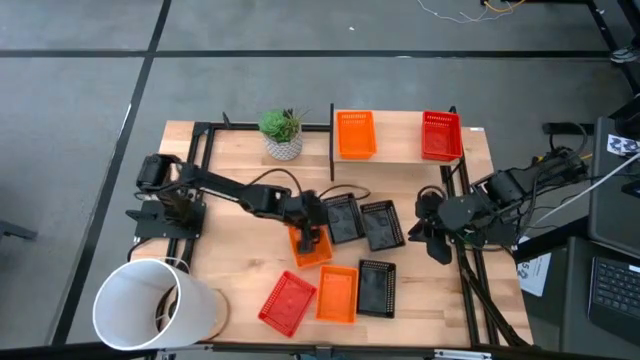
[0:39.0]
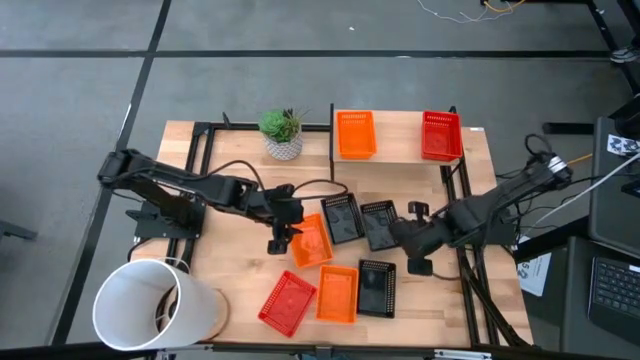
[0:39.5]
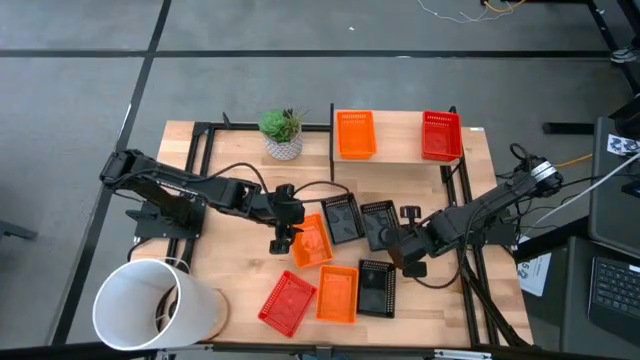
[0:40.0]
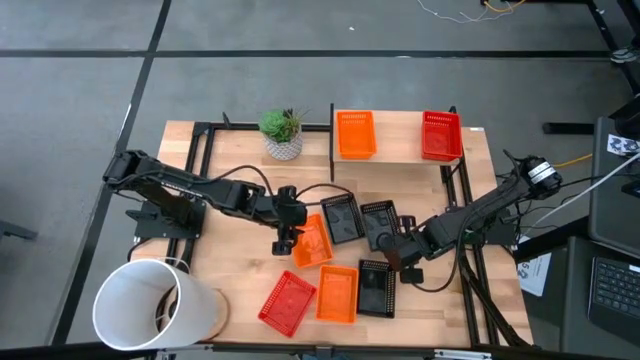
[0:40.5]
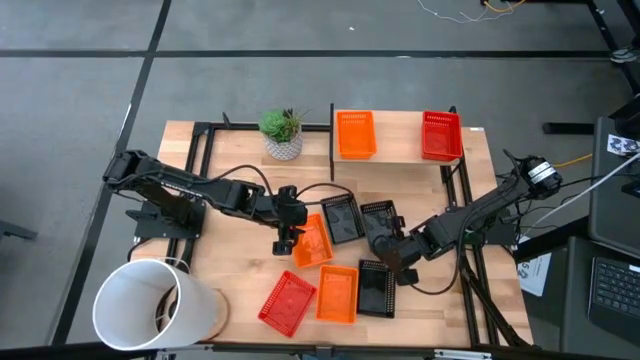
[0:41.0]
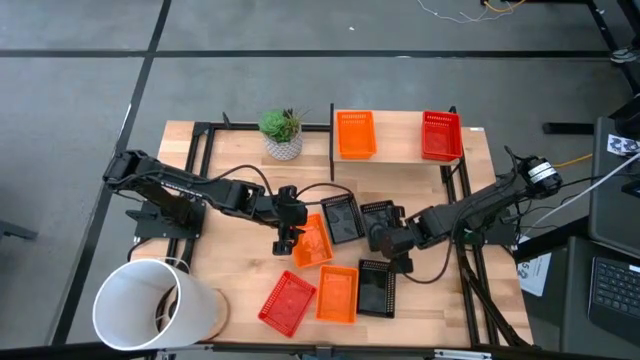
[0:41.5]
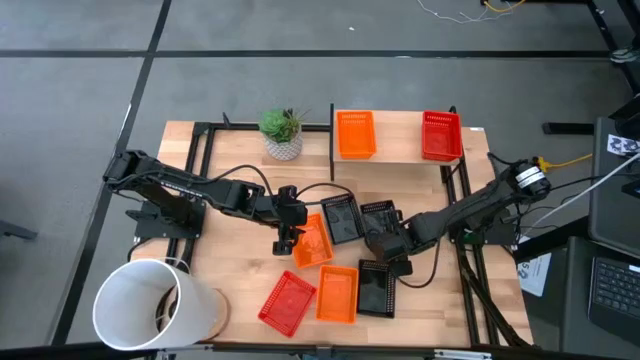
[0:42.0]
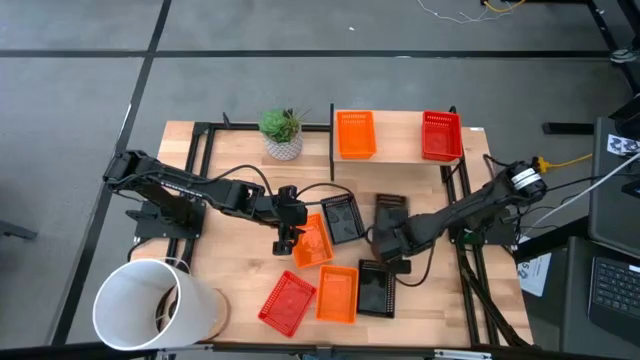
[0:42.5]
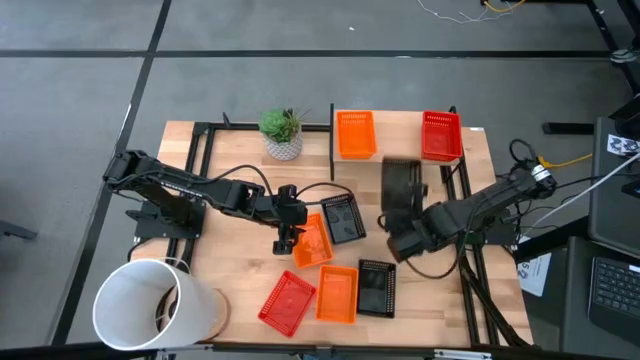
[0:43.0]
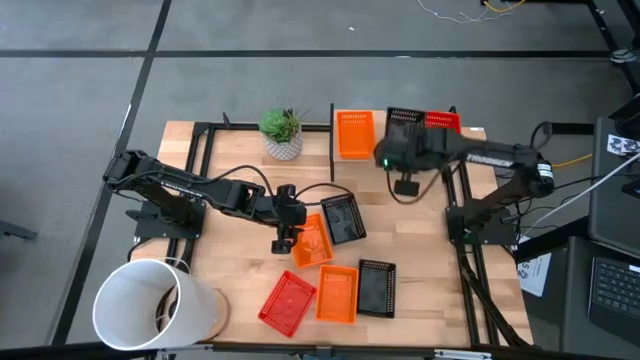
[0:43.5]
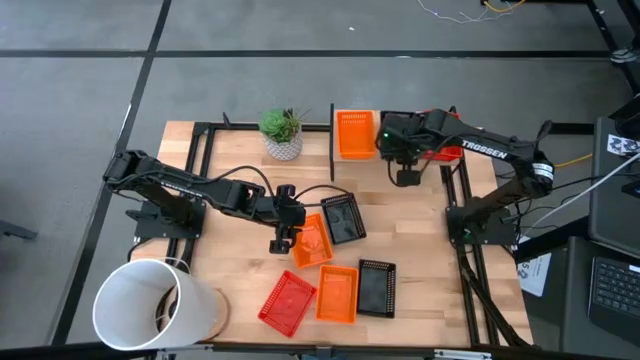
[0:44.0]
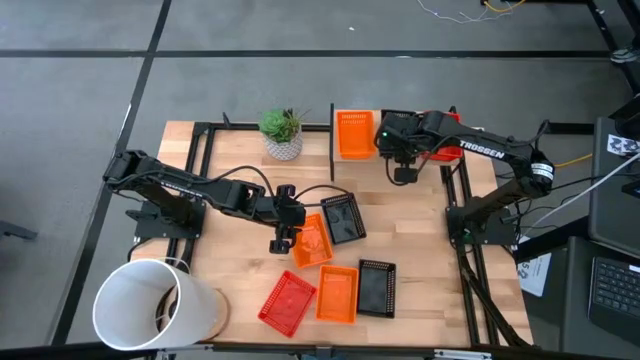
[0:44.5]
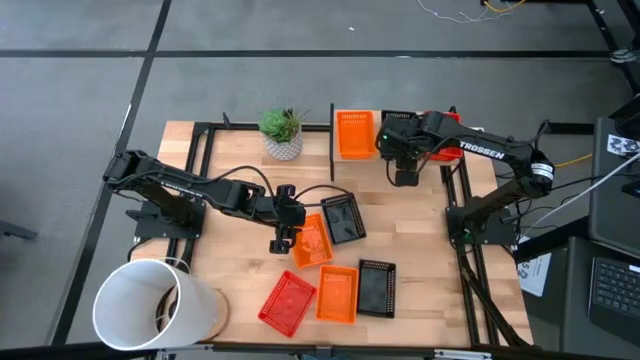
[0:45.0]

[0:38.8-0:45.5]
Task: Stack baskets on shelf by color
Put the top right black bin on the shelf

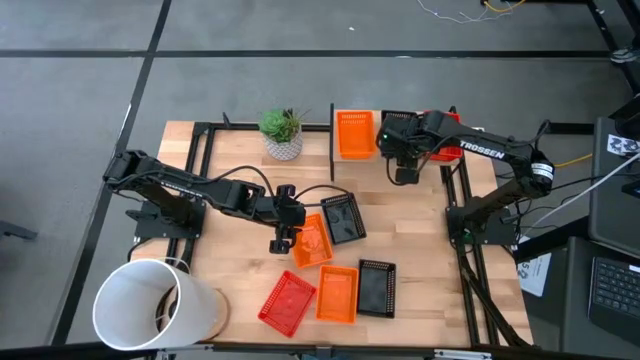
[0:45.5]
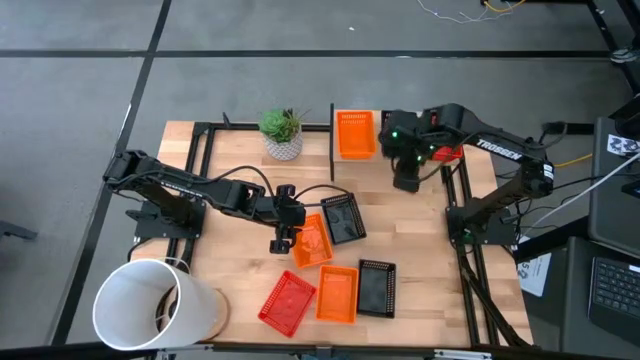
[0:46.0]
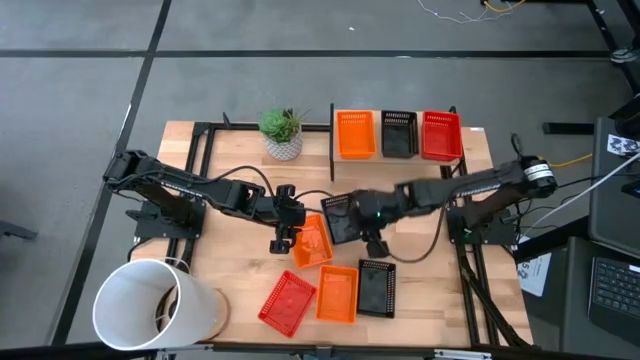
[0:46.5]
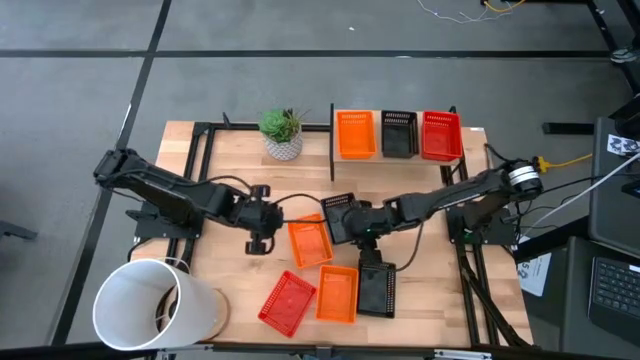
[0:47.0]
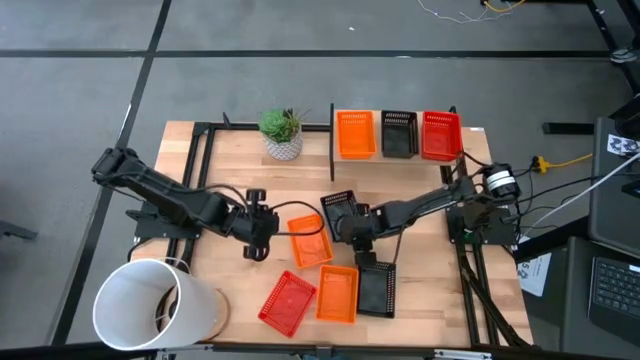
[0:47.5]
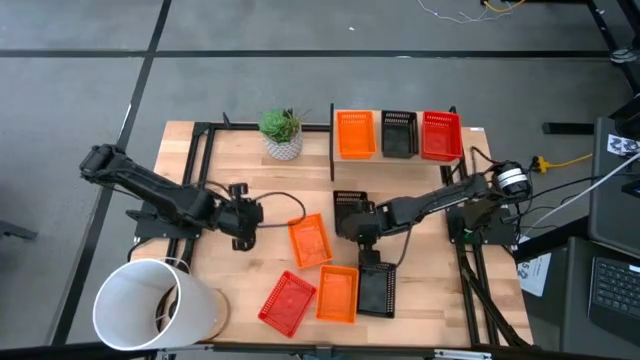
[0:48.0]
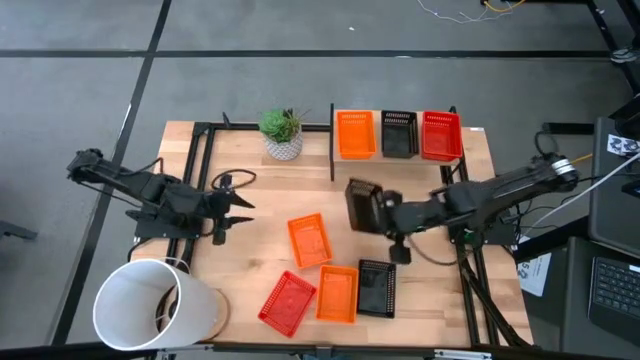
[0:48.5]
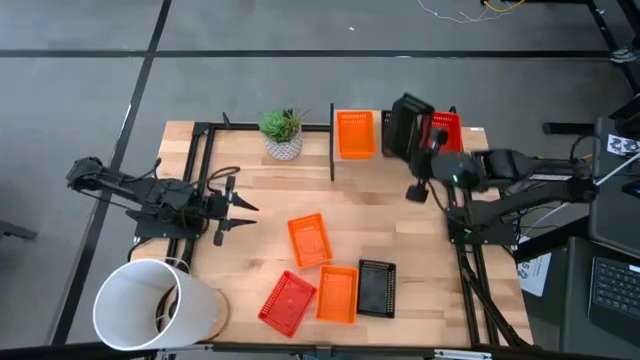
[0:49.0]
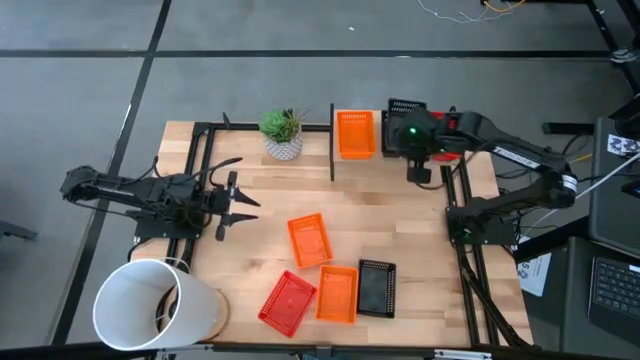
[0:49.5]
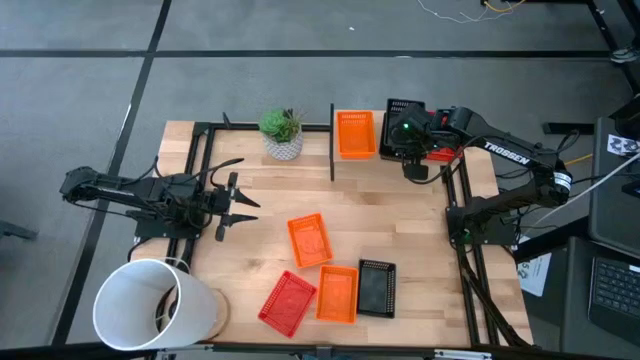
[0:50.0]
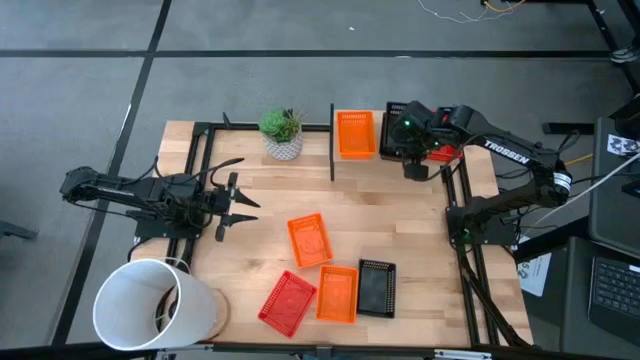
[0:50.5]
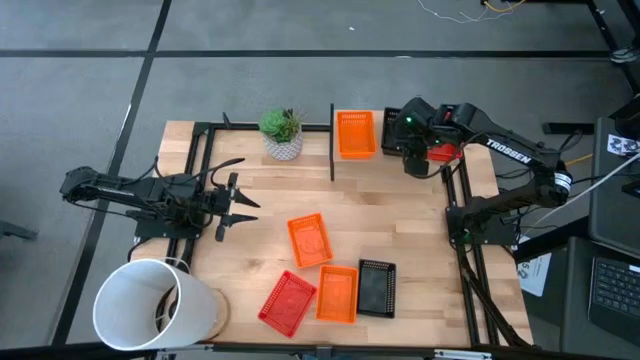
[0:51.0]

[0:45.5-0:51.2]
Stack the top black bin on top of the black bin on the shelf

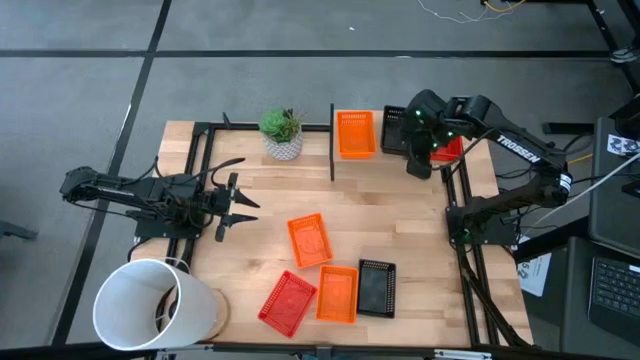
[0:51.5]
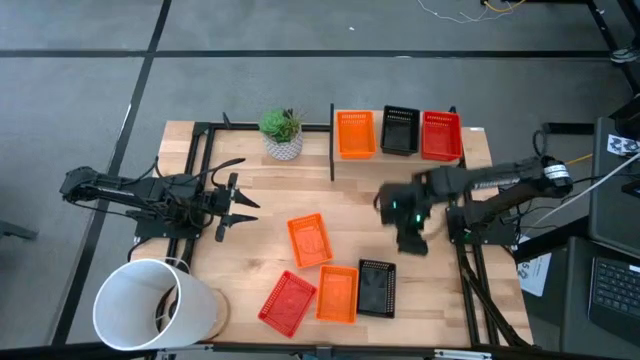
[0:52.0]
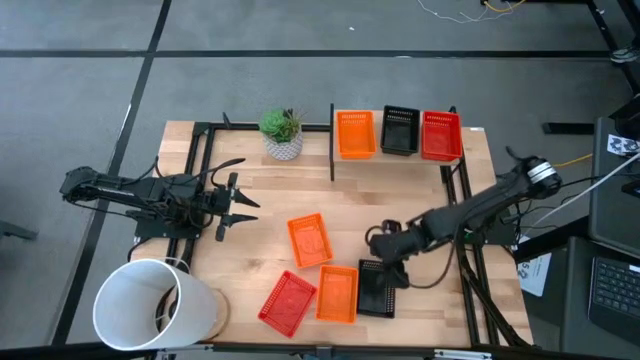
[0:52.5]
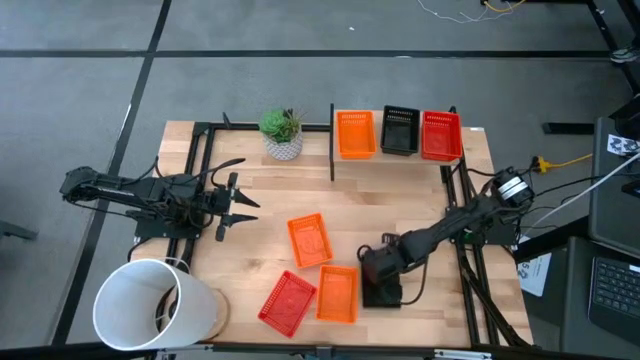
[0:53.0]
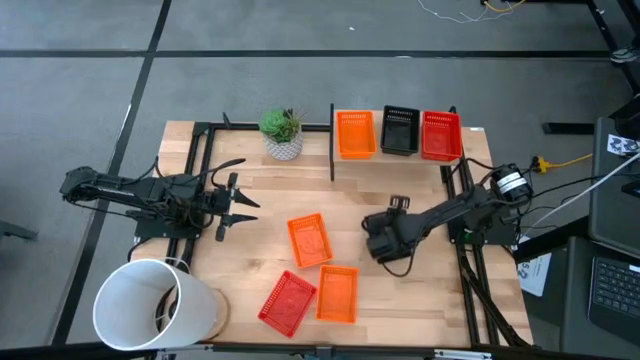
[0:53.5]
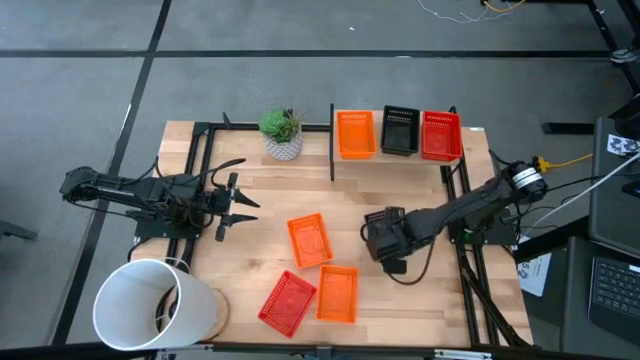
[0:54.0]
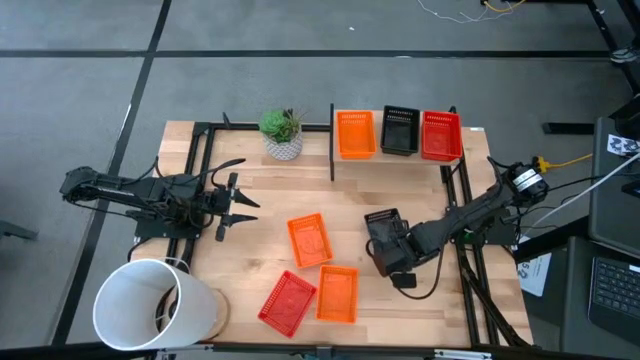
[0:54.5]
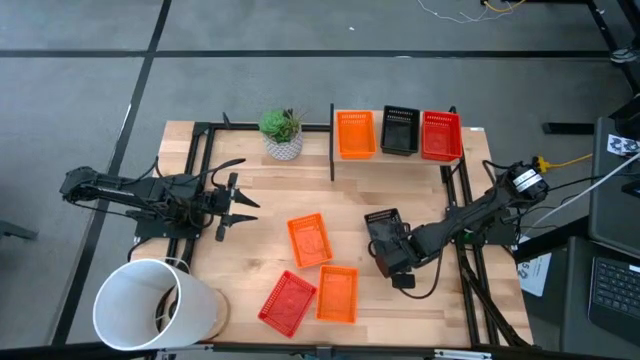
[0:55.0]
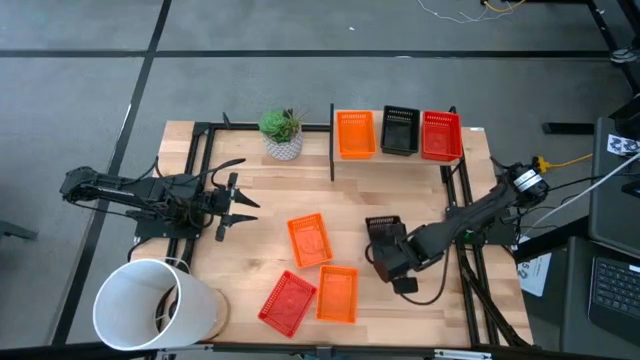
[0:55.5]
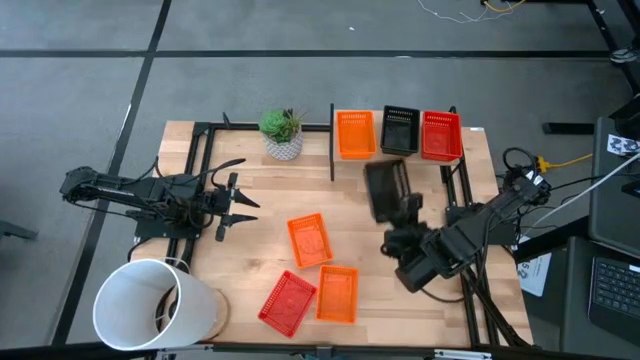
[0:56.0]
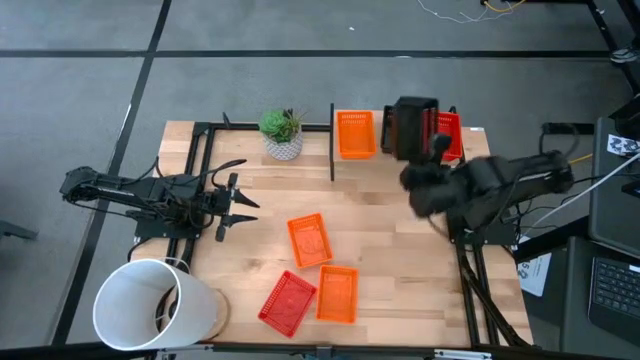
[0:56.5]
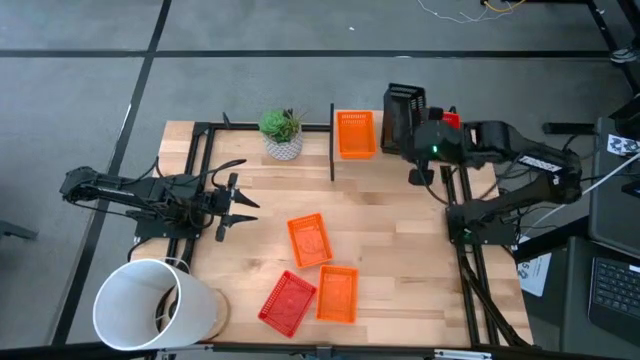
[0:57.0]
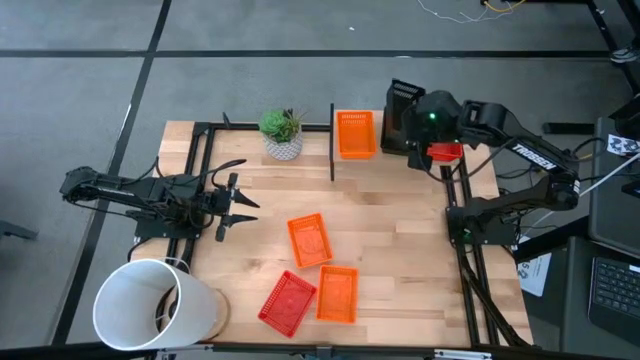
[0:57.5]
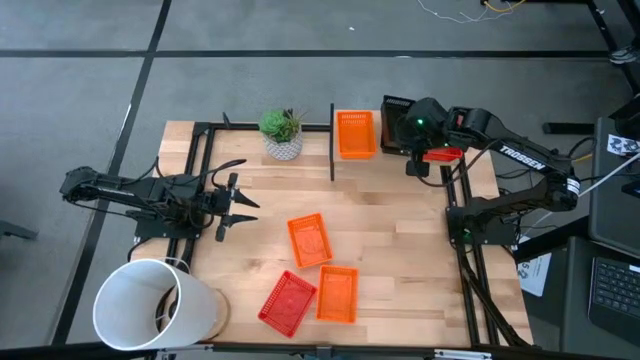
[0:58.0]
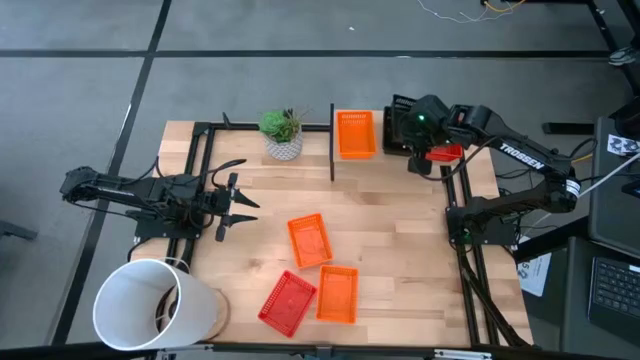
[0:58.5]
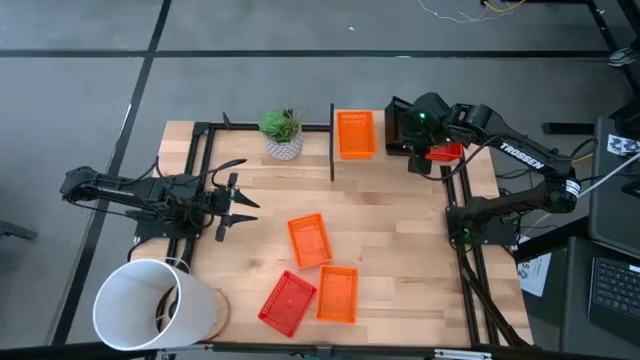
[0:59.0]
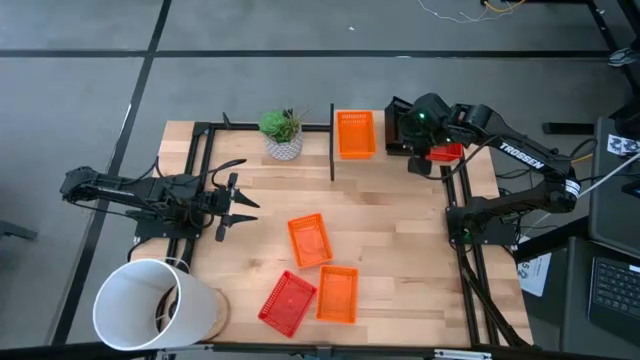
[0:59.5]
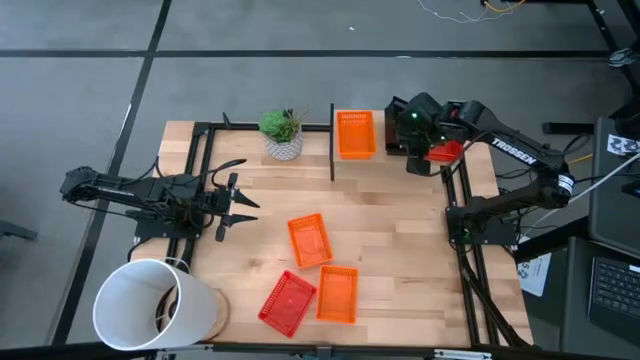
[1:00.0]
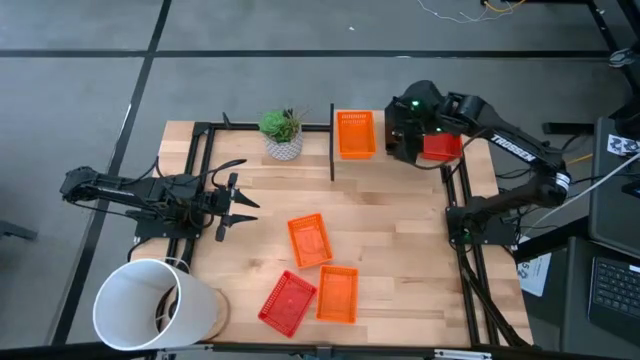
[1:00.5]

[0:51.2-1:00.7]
Stack the black bin on top of the stacked black bins on the shelf
